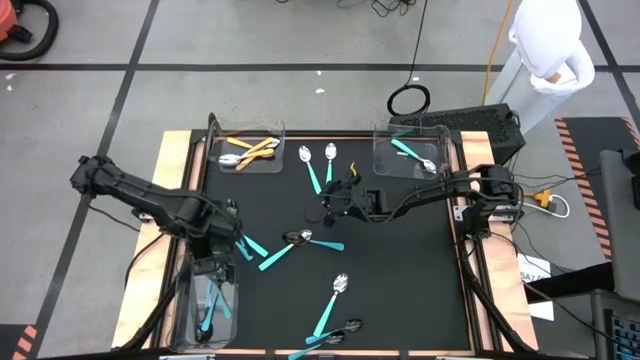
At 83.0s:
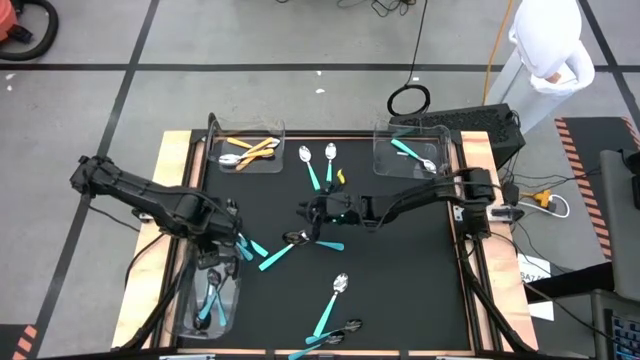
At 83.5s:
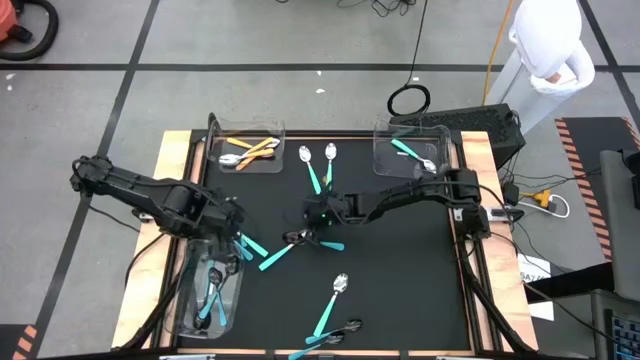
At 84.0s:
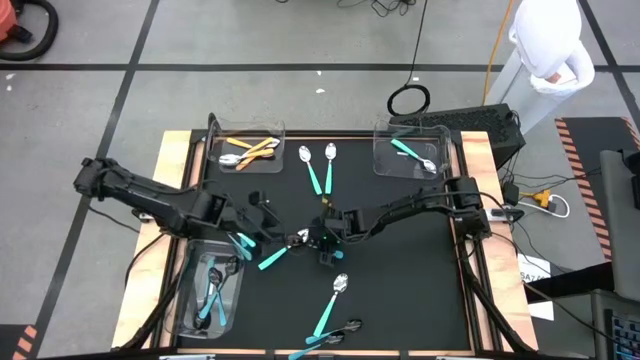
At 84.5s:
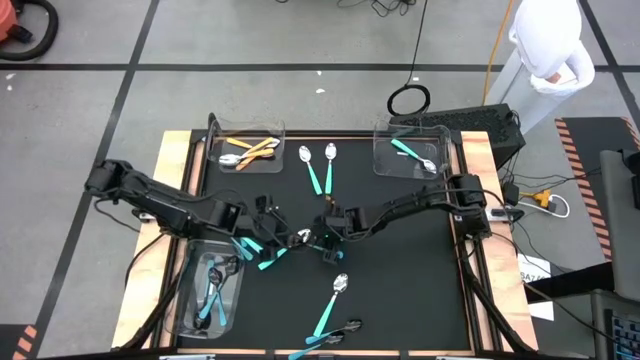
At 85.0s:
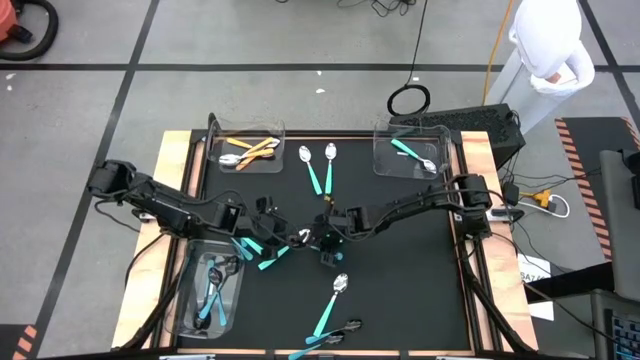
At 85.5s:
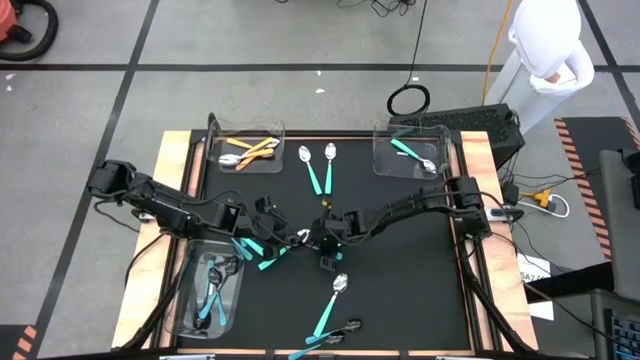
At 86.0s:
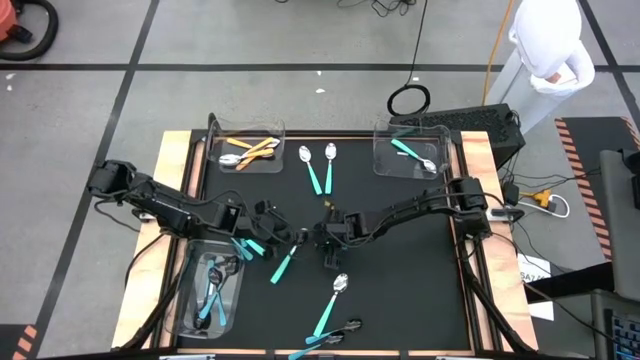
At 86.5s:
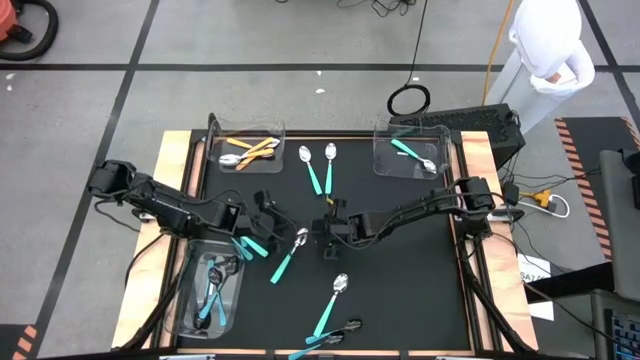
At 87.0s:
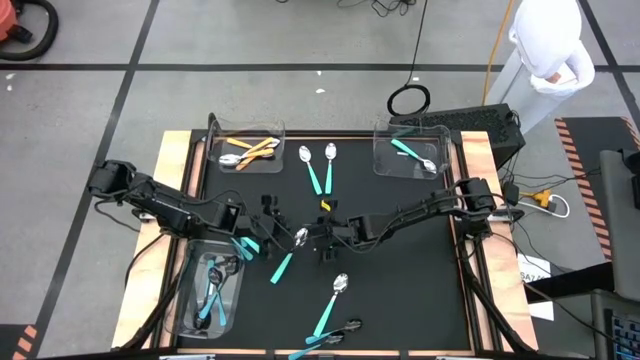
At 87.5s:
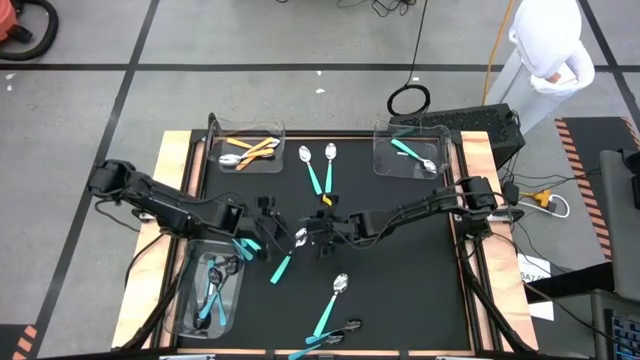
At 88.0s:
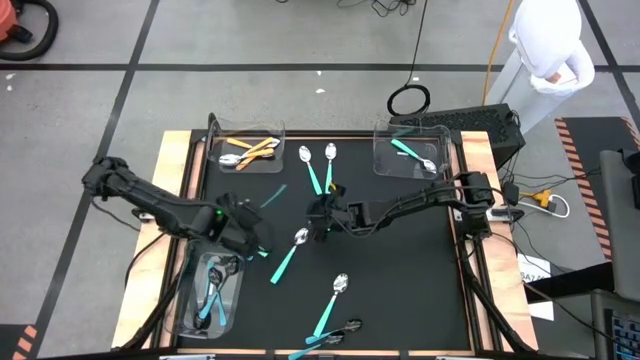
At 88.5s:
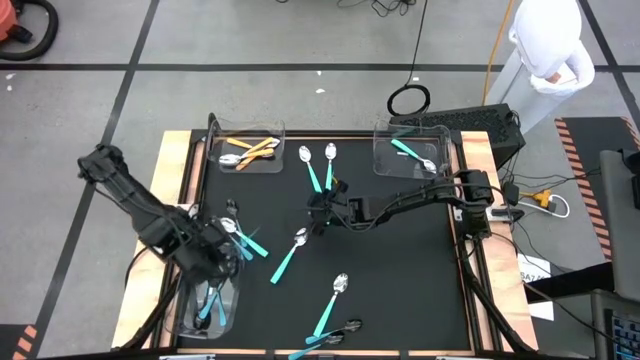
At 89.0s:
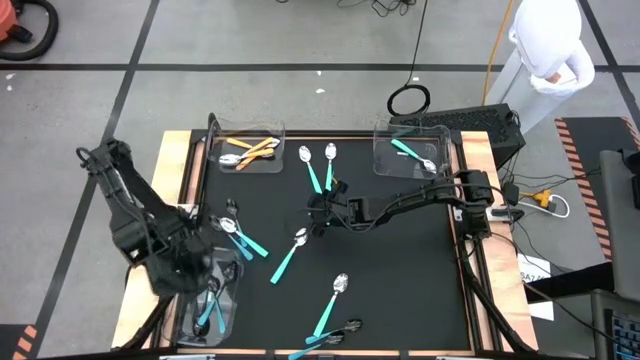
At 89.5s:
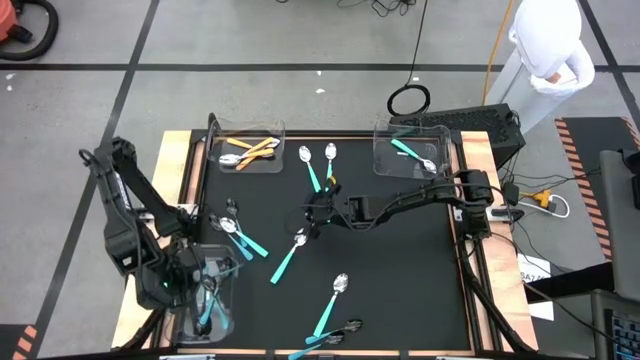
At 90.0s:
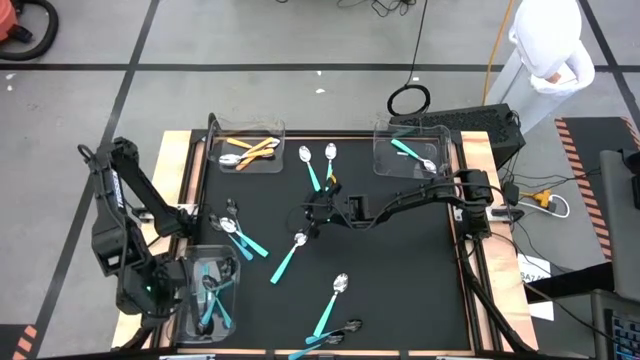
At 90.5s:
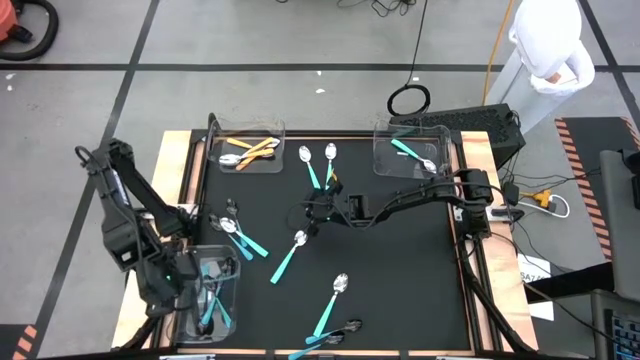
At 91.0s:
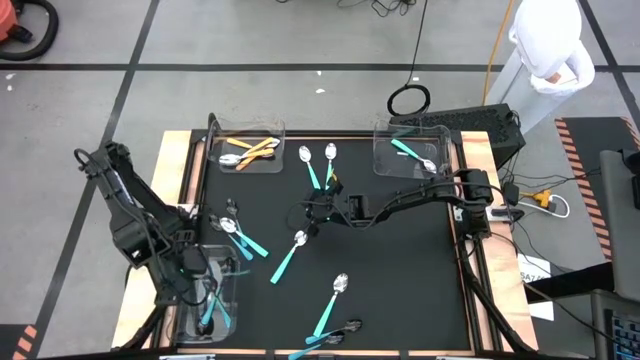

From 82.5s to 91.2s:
Task: Sort silverware by color (type)
Put the blue spoon into the bottom bin

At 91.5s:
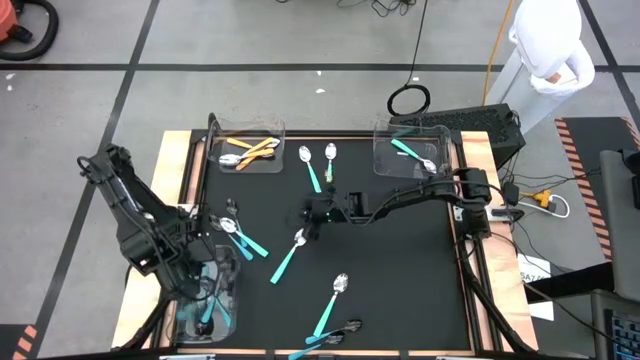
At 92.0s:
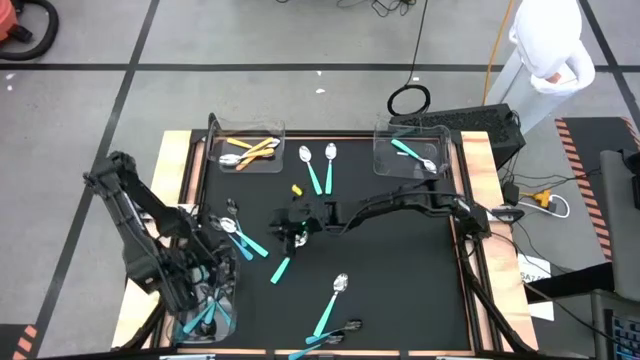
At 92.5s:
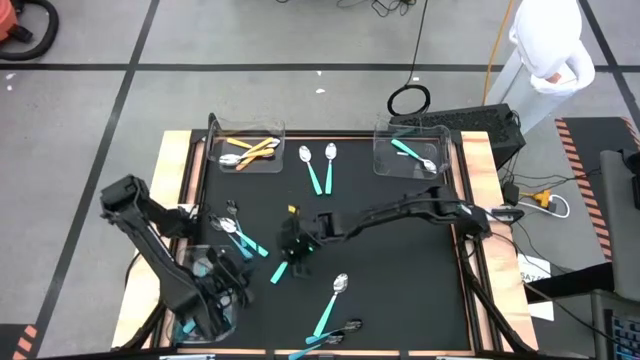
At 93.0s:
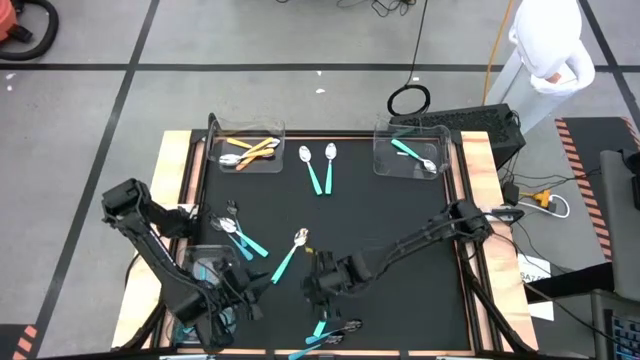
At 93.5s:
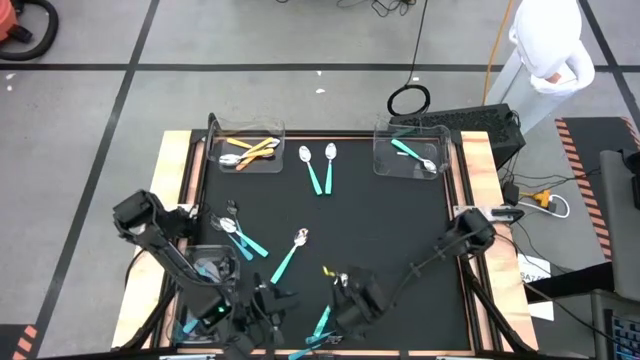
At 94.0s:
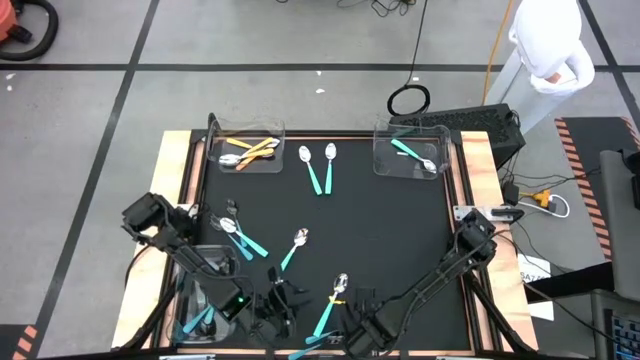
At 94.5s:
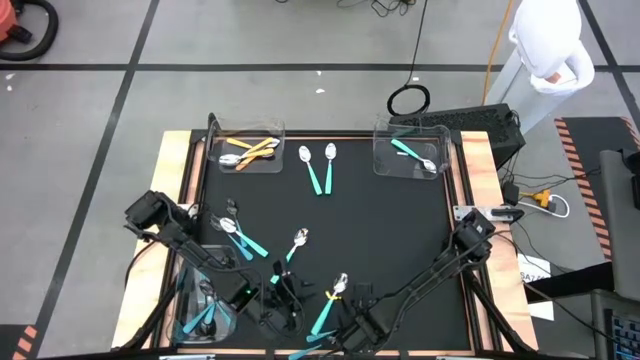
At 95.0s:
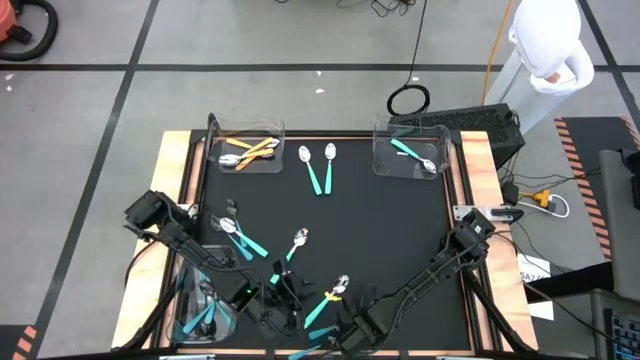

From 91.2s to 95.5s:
Put the blue spoon into the bottom bin

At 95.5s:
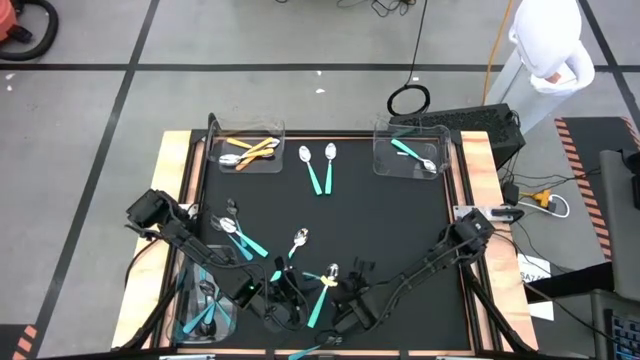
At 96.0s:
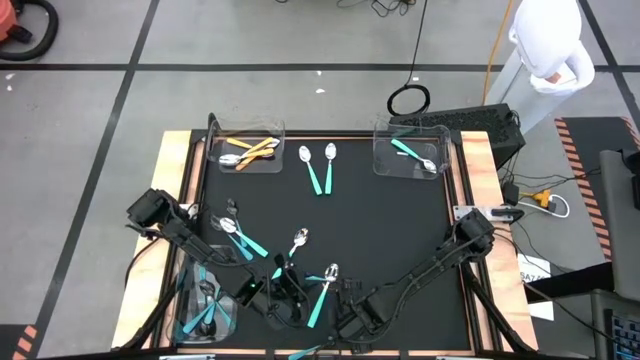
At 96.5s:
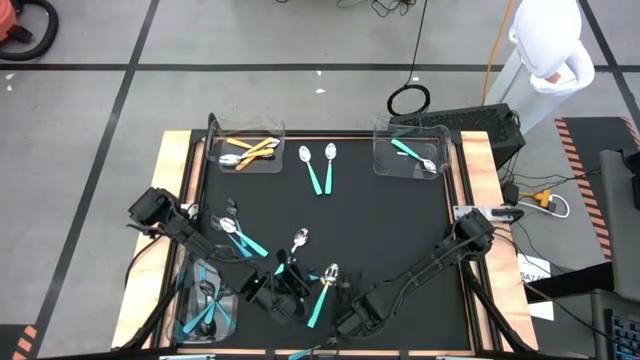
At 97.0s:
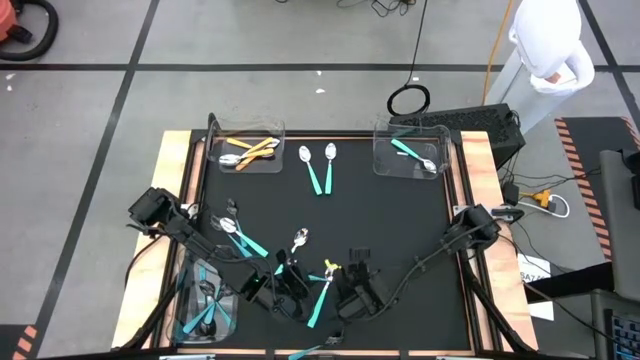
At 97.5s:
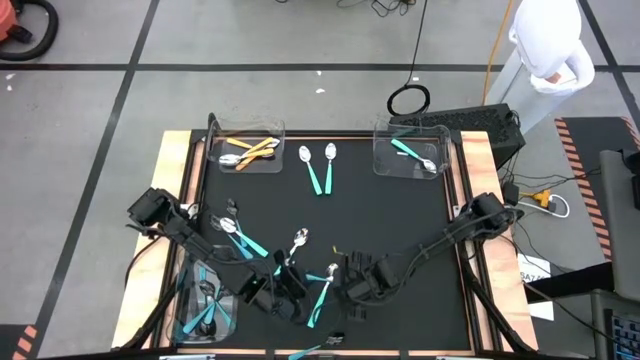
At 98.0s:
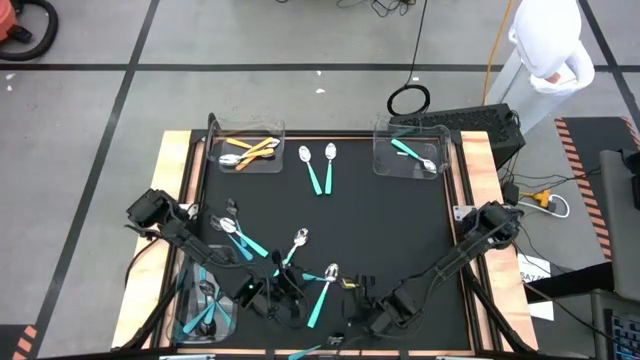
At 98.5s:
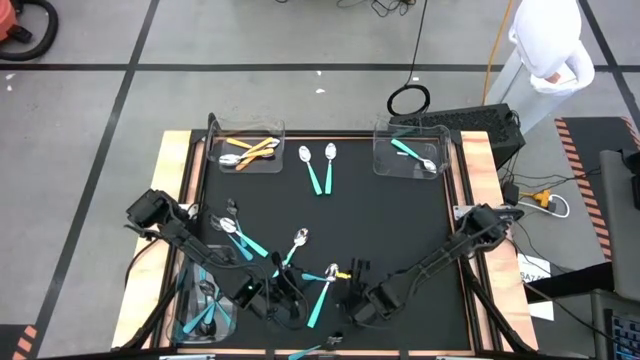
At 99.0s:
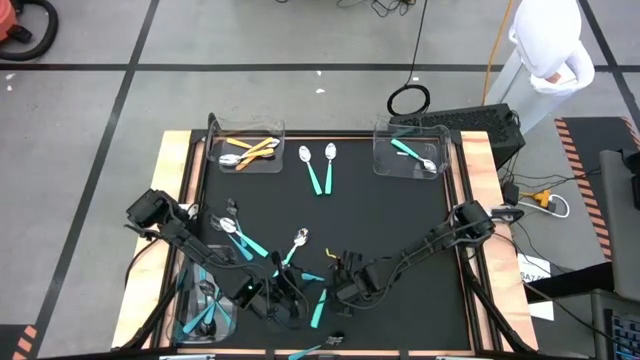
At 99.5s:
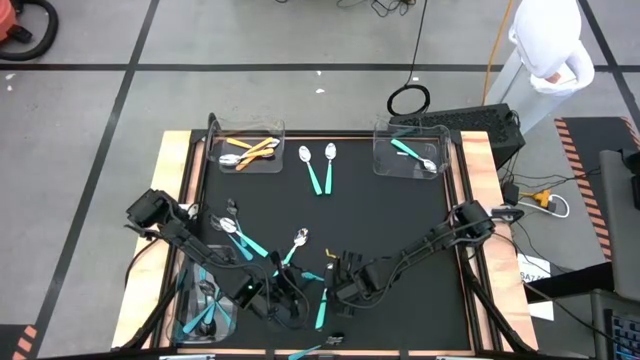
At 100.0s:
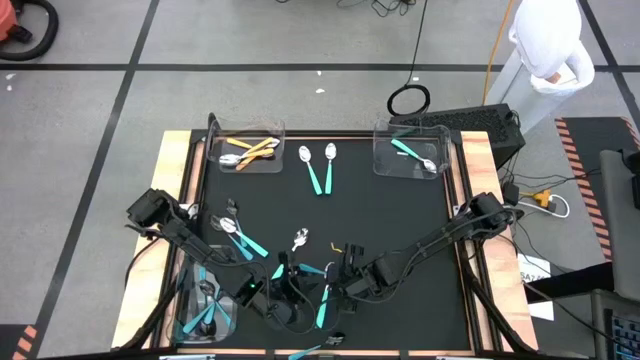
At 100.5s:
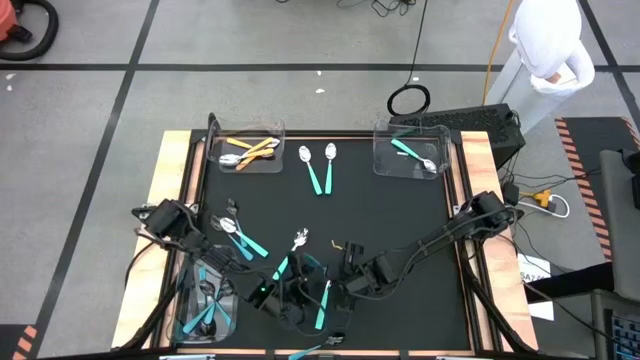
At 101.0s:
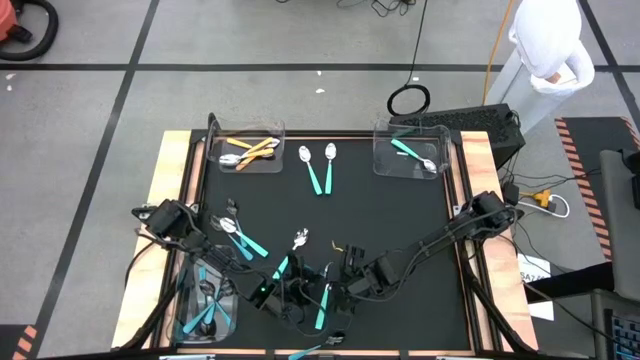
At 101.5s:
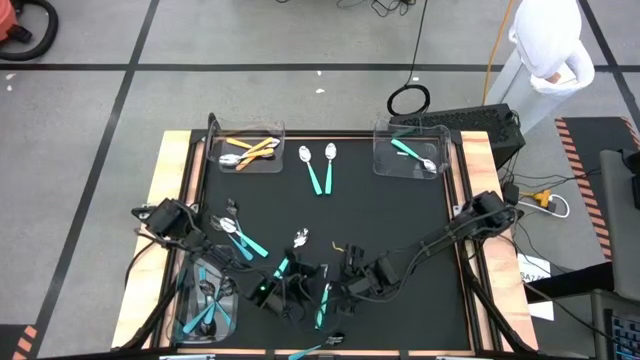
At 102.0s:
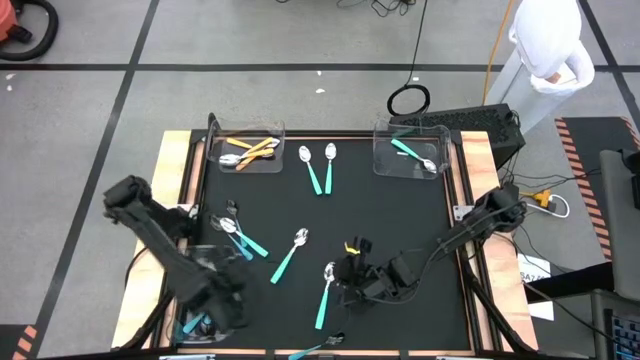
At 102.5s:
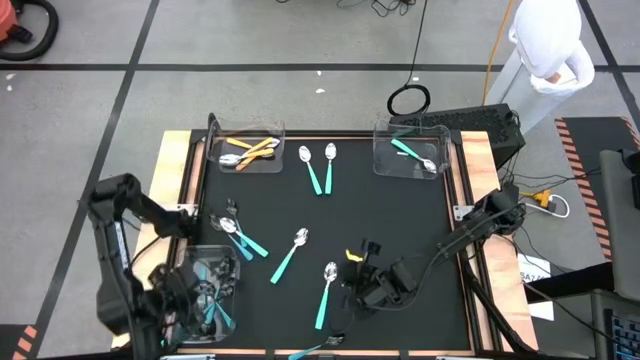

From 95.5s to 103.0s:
Put the blue spoon into the bottom bin

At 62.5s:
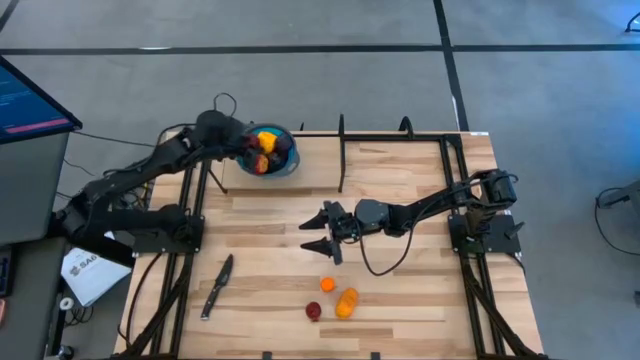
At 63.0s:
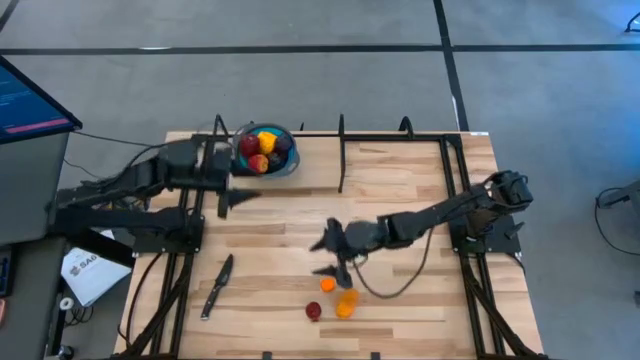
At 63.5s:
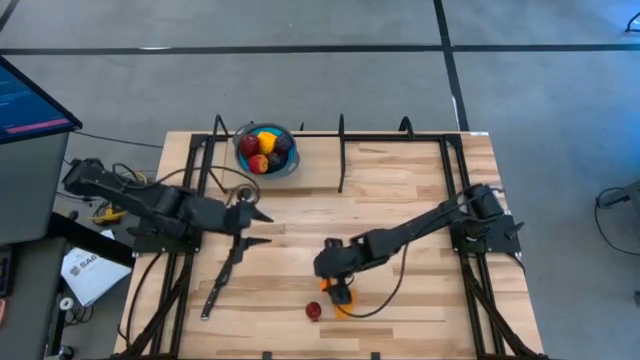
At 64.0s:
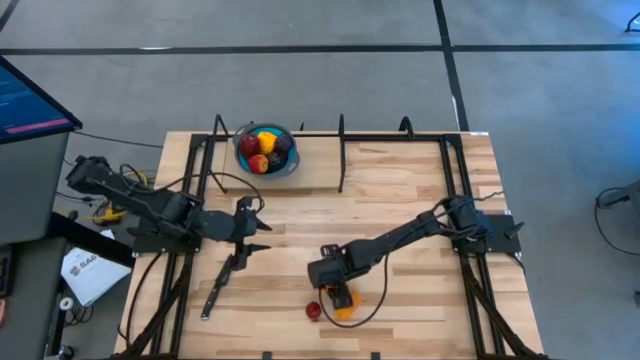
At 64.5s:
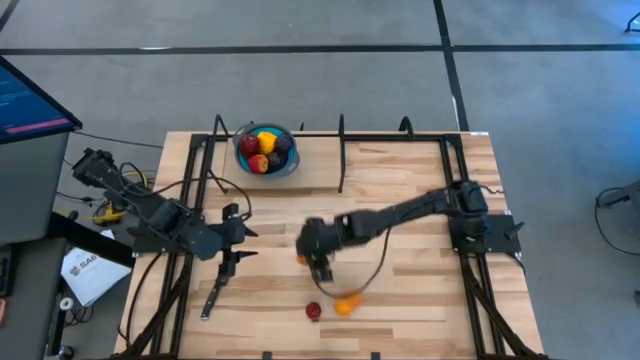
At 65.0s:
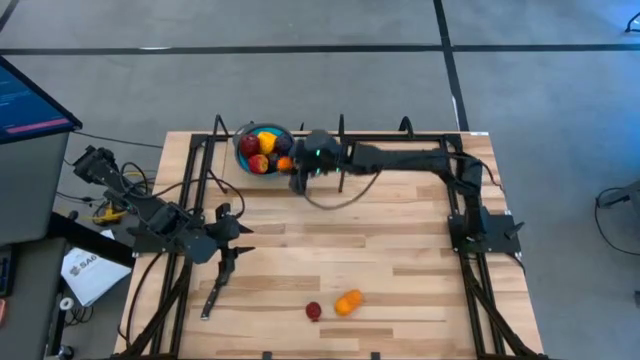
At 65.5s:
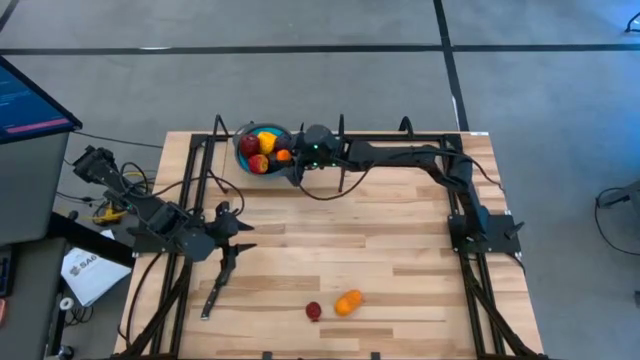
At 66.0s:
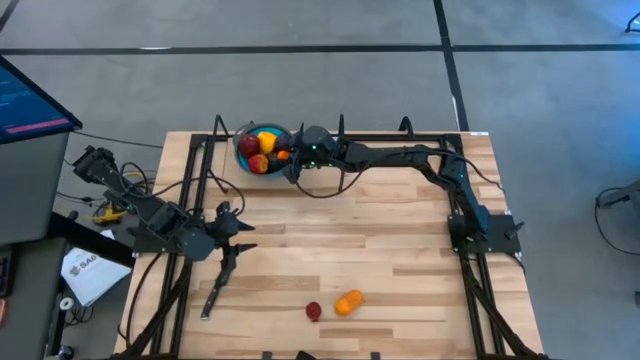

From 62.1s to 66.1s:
Task: Pick & Place Fruit
Put the orange in the blue strainer bowl on the shelf
